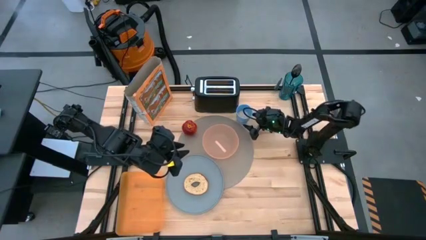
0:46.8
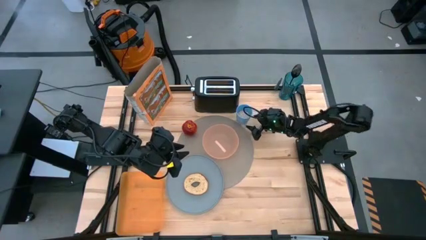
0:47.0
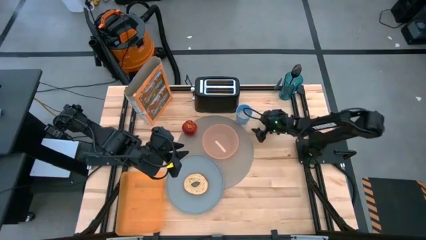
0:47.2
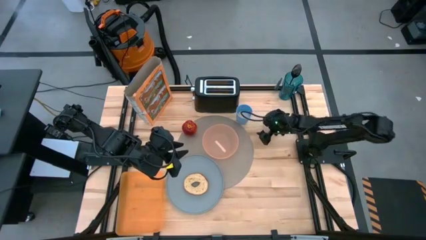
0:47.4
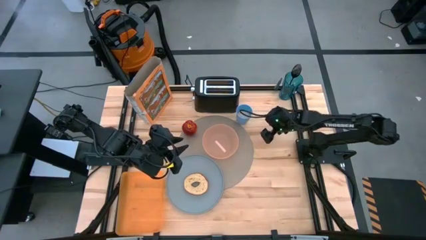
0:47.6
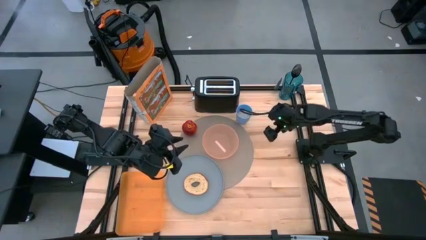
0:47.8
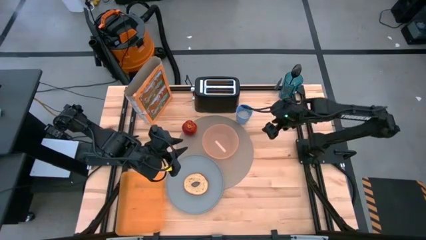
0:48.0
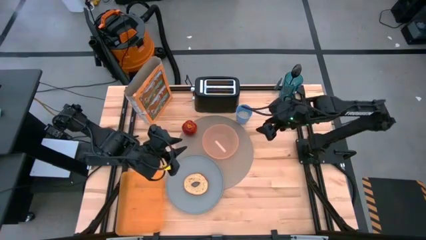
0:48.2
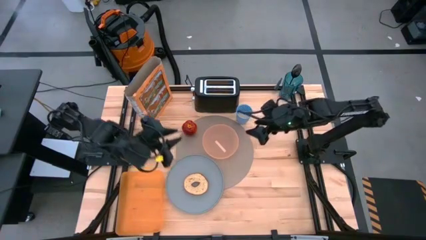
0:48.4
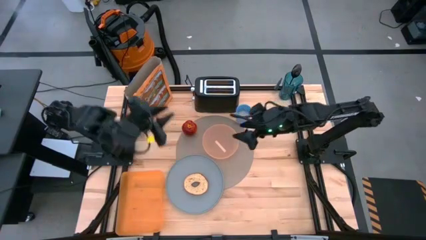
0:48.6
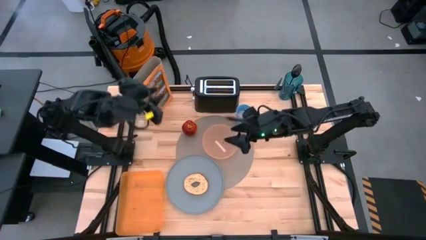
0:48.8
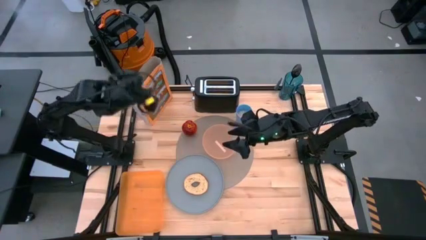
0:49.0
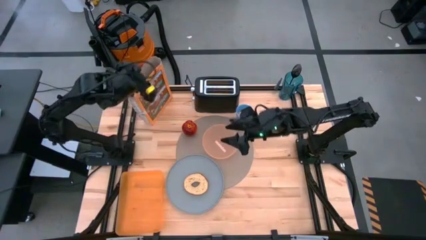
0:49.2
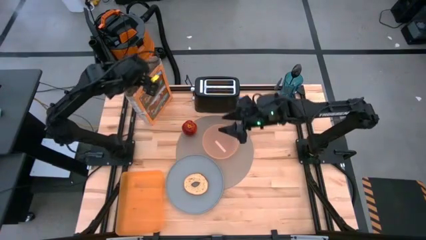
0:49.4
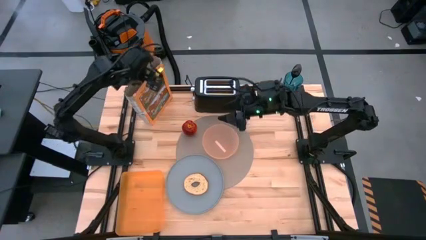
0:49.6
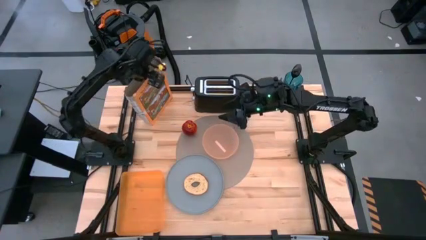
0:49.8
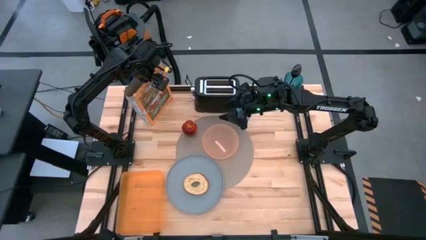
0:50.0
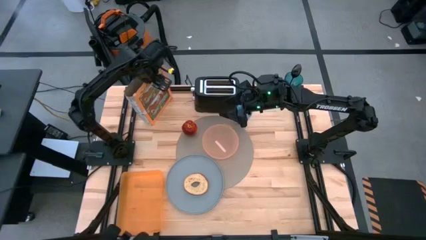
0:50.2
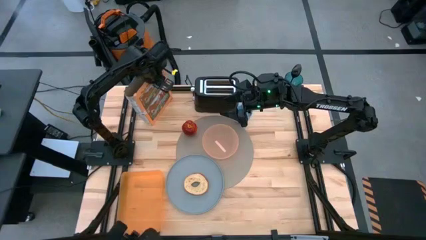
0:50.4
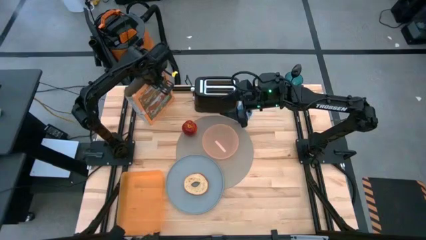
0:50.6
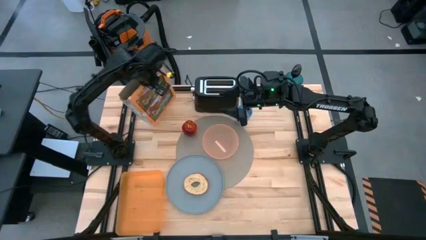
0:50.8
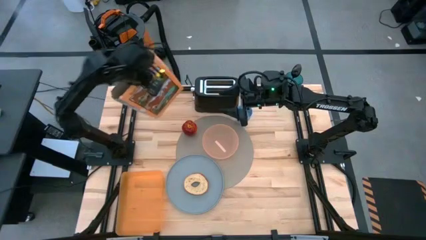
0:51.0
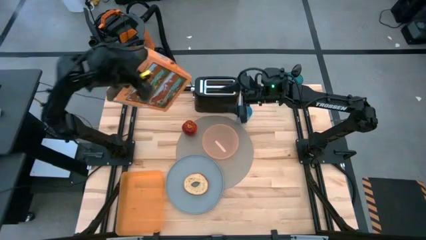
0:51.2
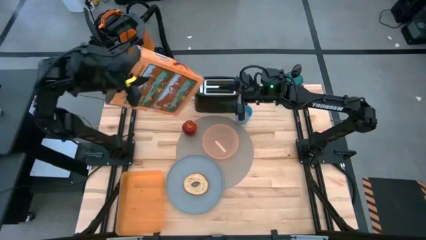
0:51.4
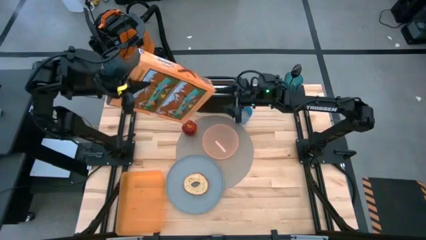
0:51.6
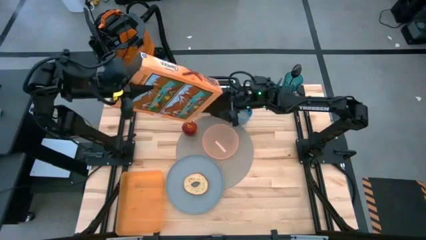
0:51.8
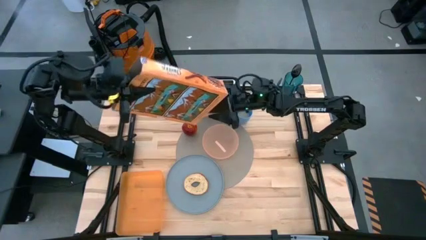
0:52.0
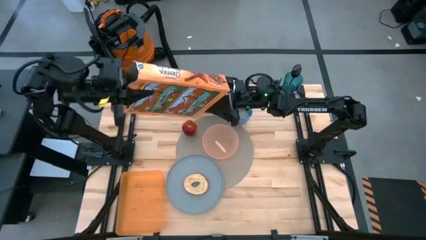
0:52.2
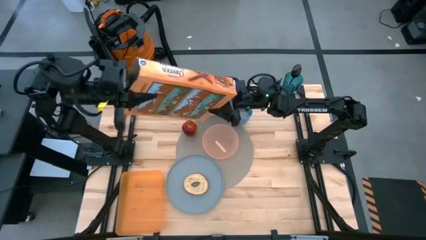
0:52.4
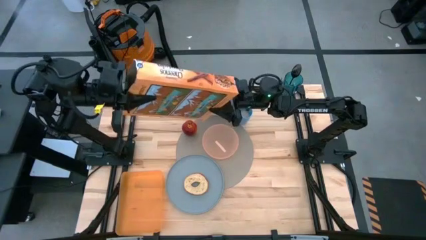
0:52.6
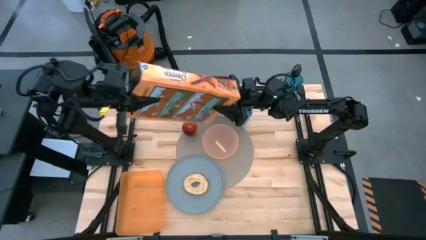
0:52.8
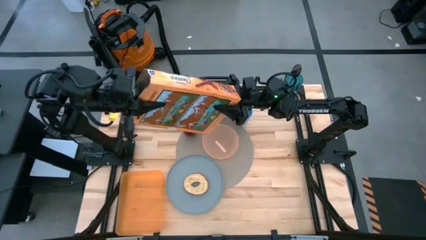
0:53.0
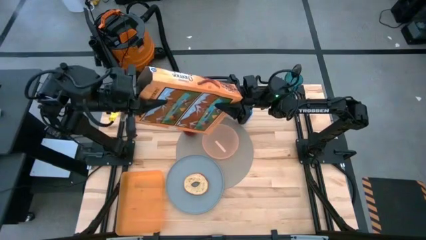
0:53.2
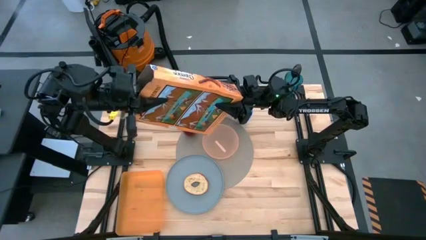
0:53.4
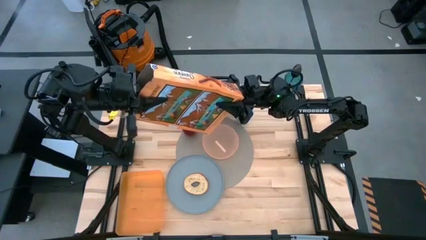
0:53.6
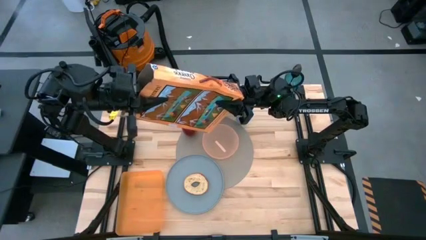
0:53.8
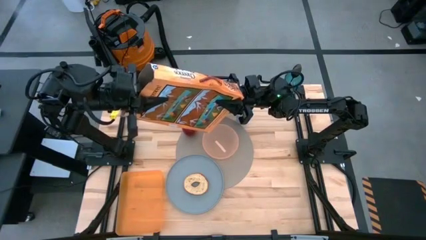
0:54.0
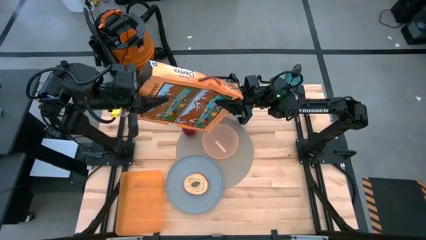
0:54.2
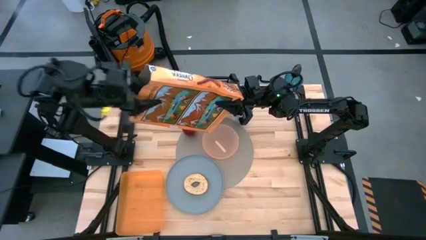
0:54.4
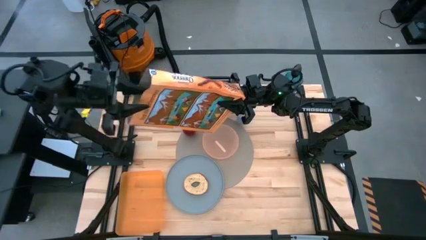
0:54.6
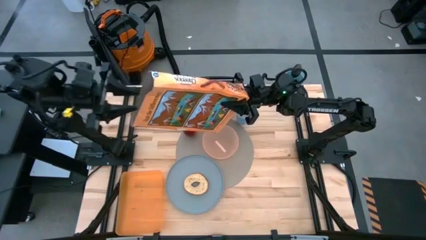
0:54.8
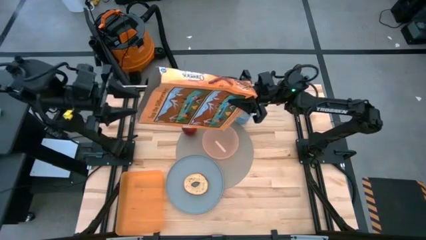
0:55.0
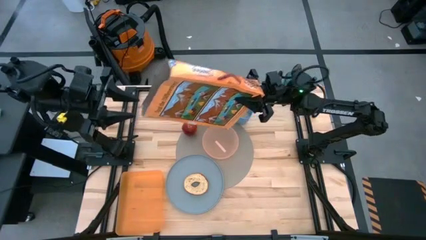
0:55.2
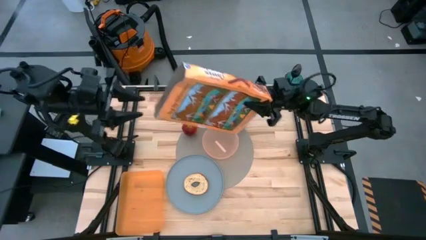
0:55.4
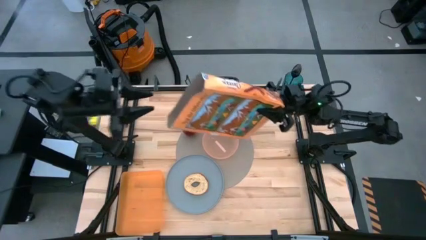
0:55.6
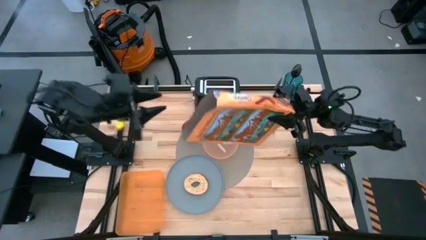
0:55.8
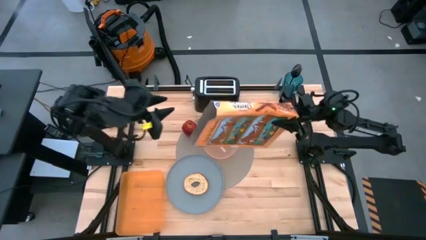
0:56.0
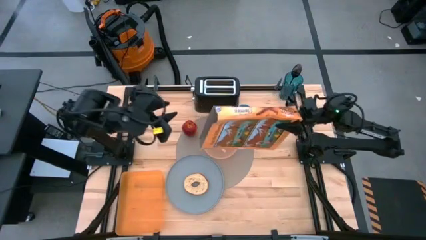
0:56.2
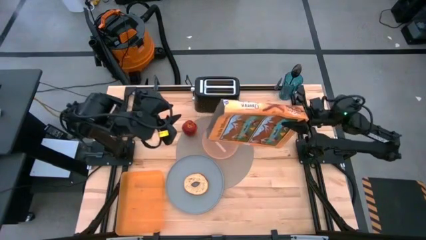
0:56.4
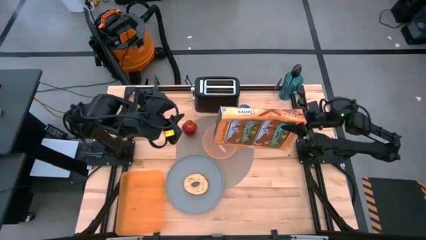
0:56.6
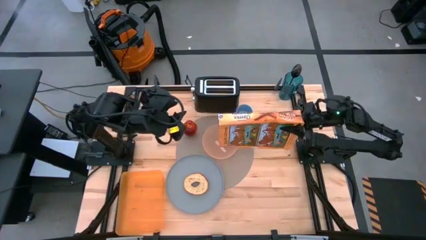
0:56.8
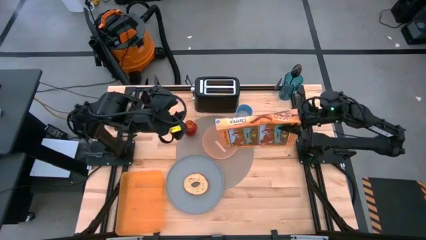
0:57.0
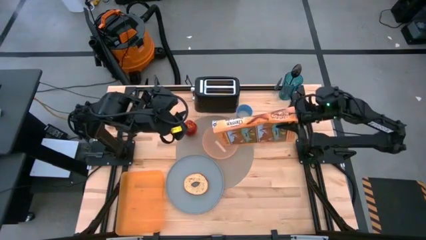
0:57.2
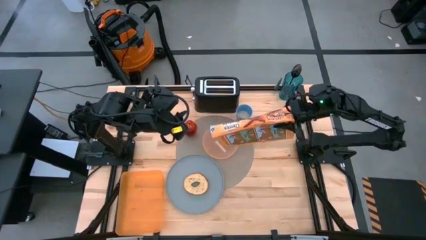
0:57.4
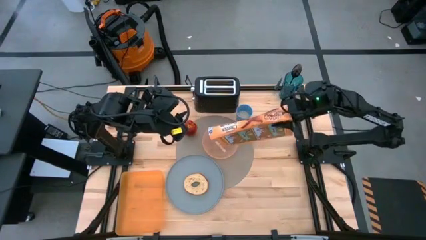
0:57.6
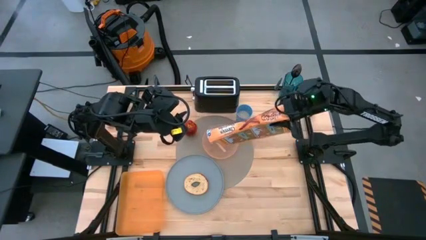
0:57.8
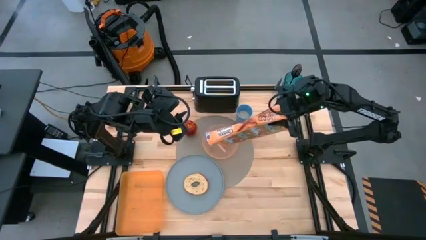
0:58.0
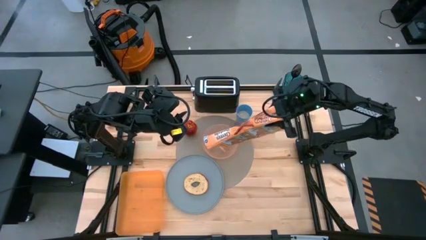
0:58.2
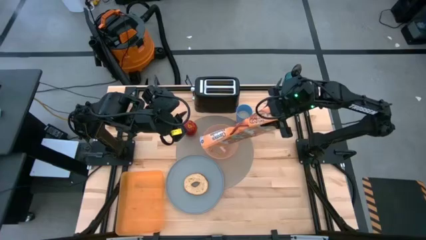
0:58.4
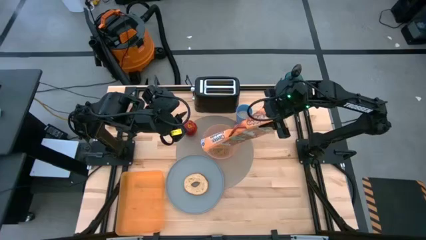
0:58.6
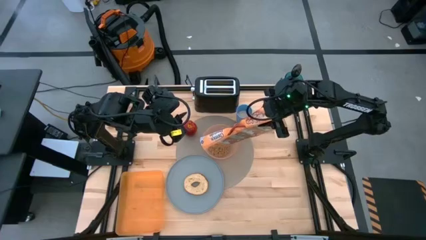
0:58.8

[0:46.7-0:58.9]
Task: Arrange a breakfast setting
Pour the cereal from the cereal box into the orange bowl
